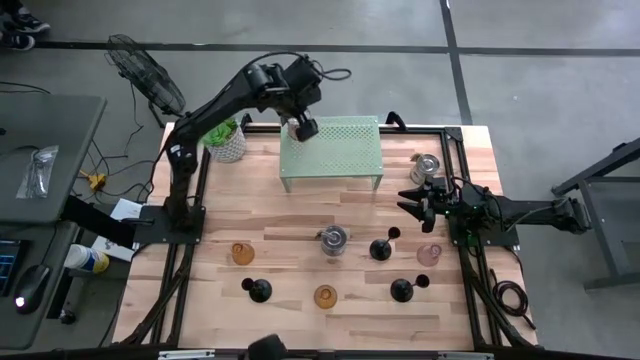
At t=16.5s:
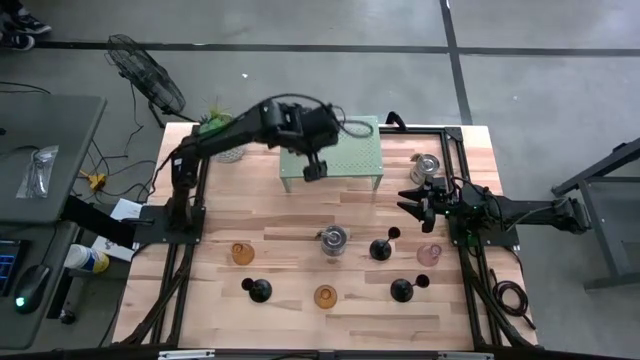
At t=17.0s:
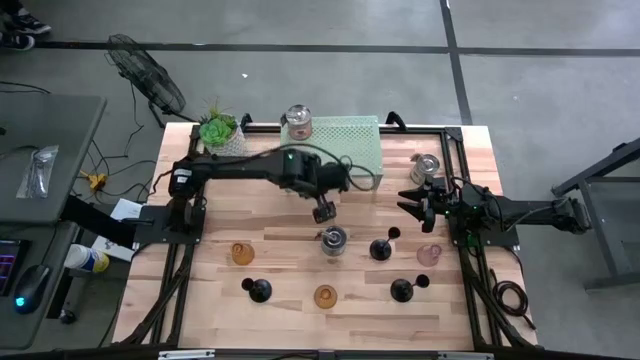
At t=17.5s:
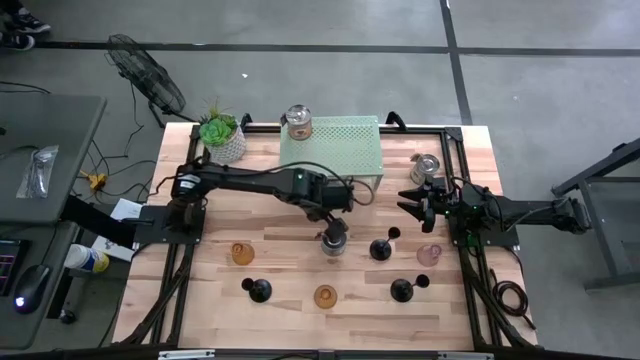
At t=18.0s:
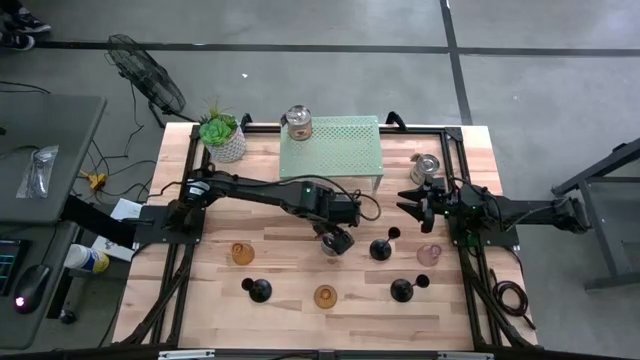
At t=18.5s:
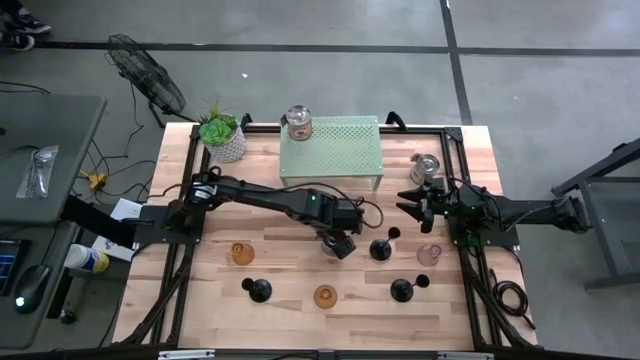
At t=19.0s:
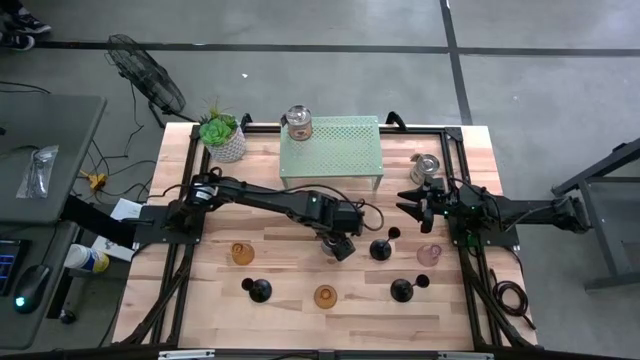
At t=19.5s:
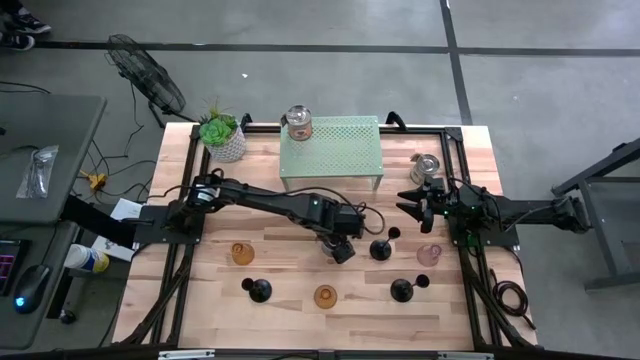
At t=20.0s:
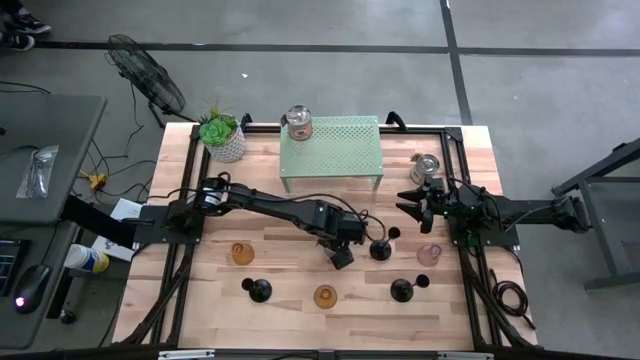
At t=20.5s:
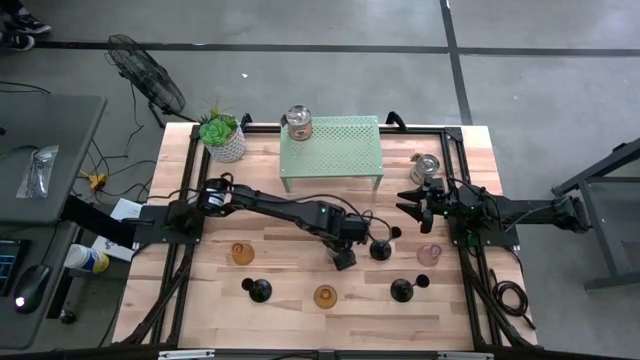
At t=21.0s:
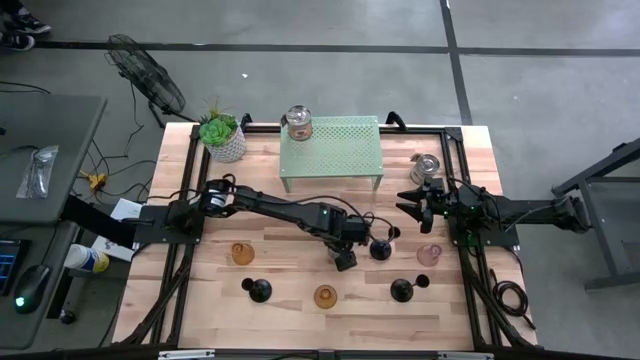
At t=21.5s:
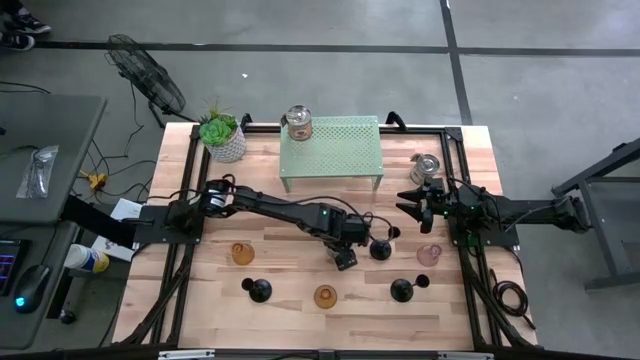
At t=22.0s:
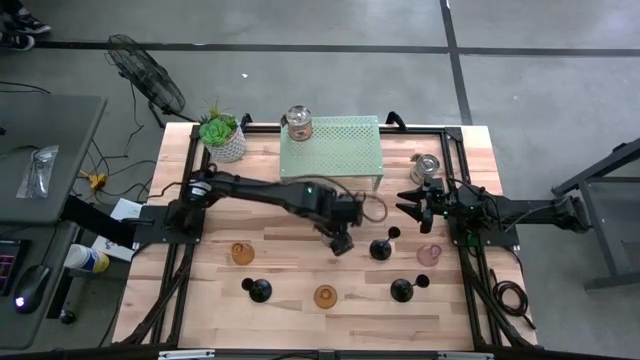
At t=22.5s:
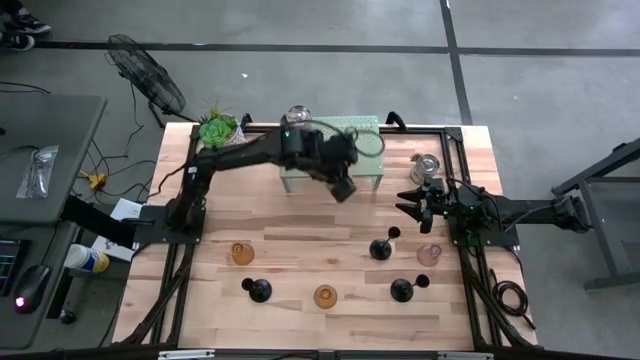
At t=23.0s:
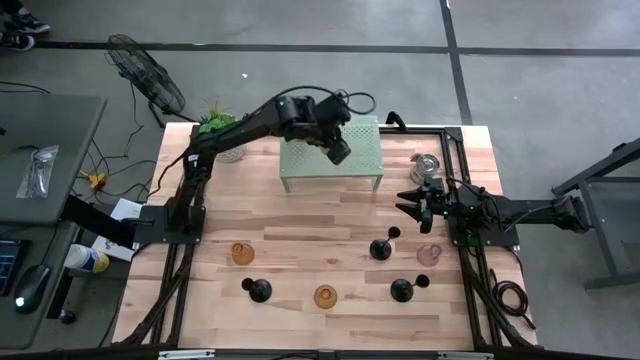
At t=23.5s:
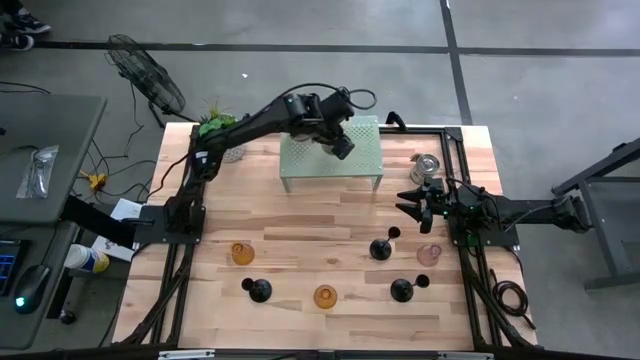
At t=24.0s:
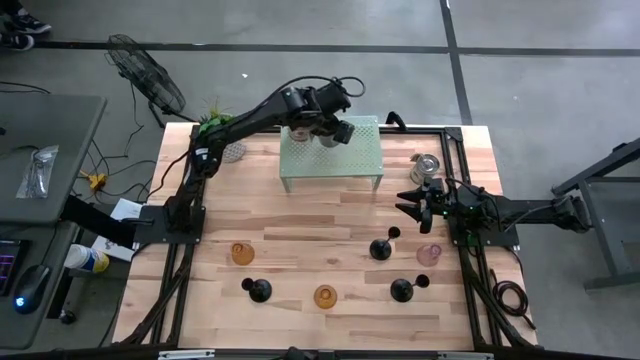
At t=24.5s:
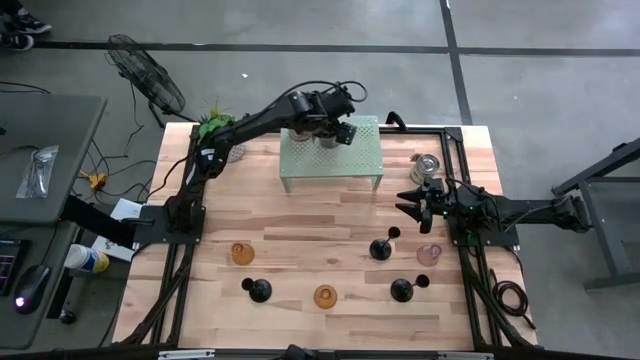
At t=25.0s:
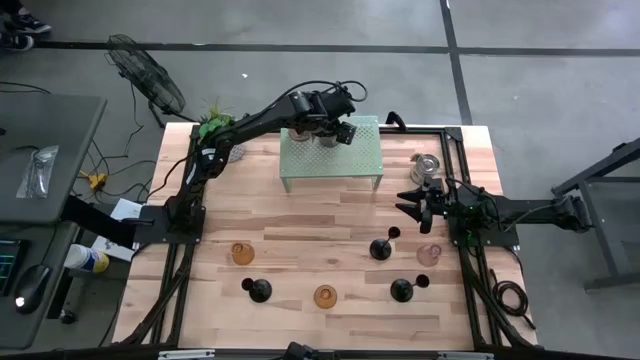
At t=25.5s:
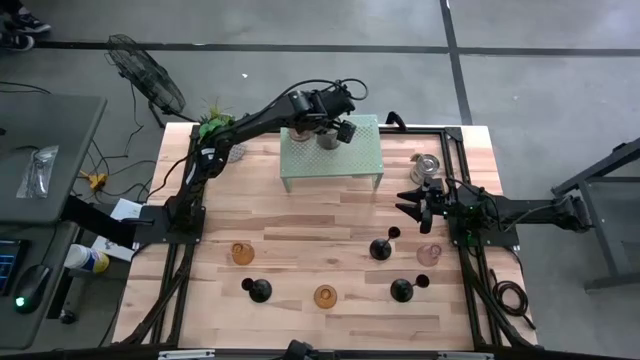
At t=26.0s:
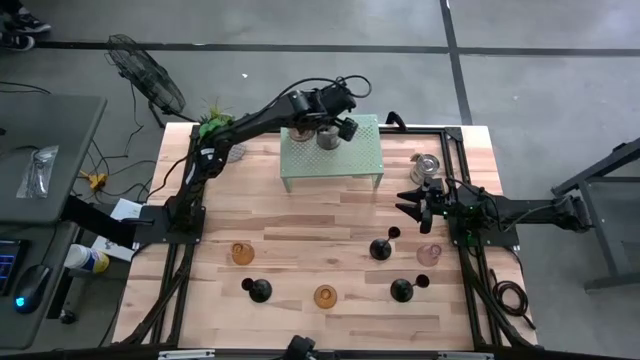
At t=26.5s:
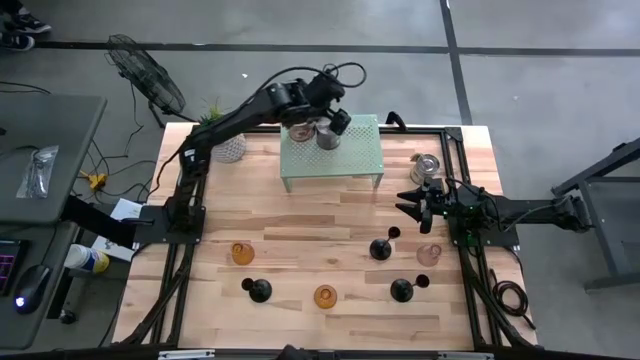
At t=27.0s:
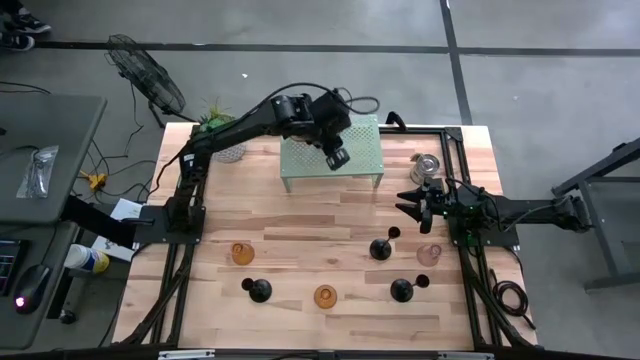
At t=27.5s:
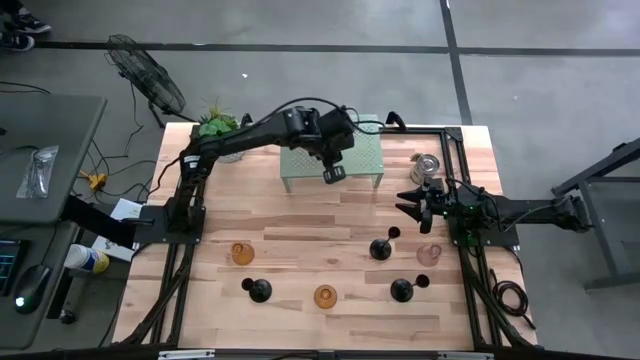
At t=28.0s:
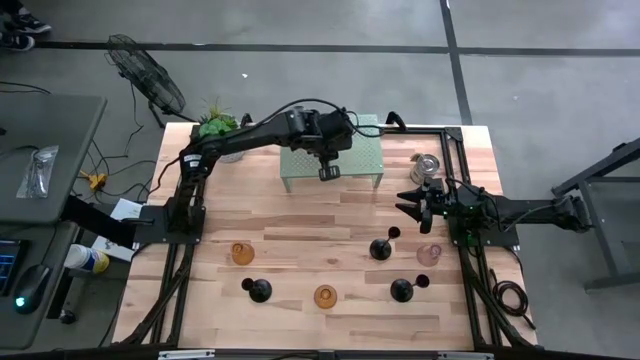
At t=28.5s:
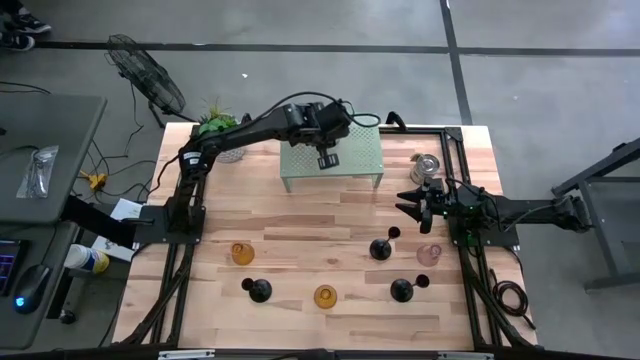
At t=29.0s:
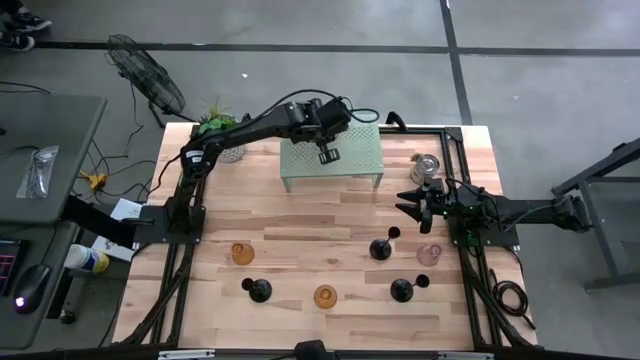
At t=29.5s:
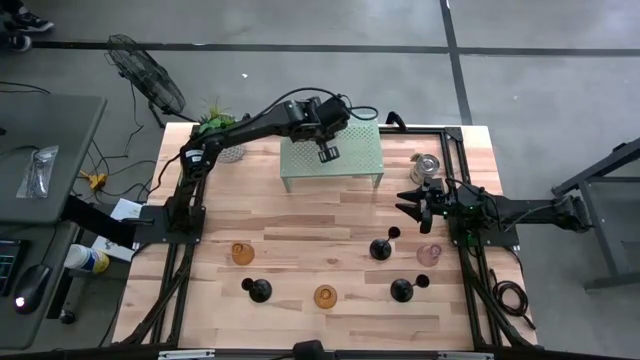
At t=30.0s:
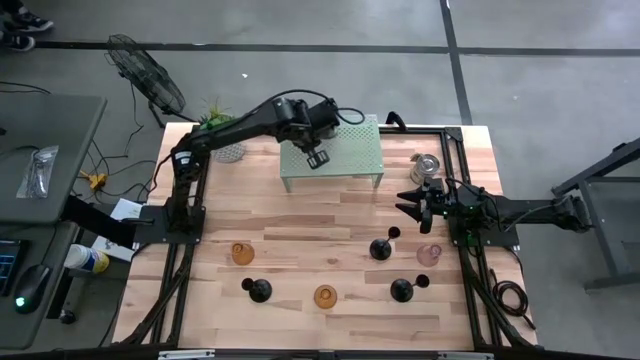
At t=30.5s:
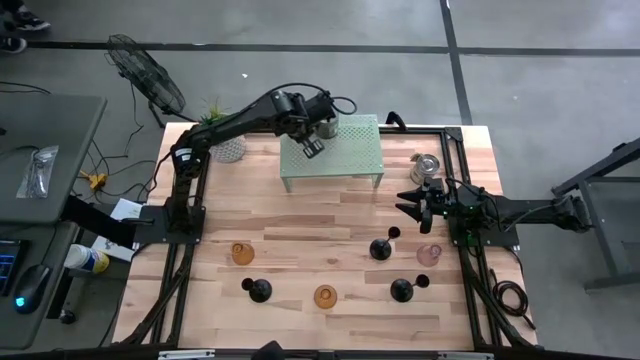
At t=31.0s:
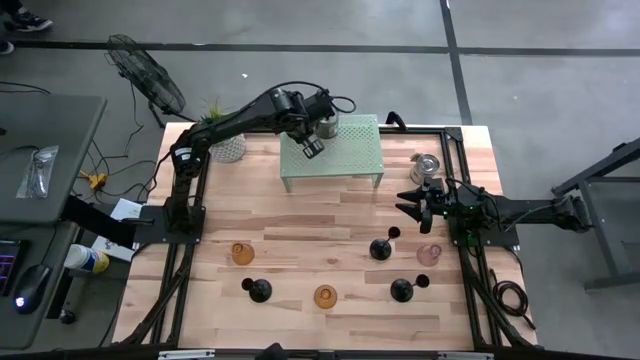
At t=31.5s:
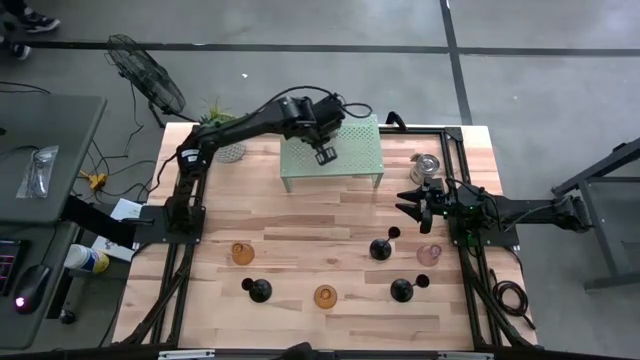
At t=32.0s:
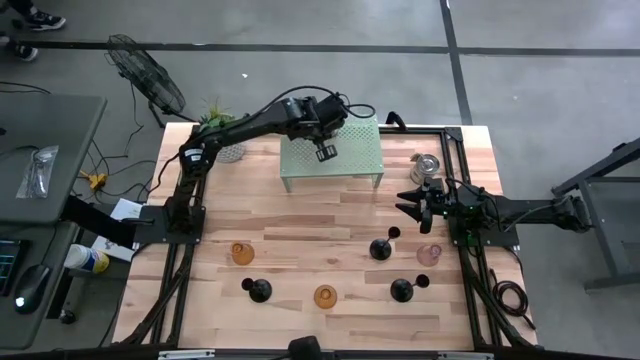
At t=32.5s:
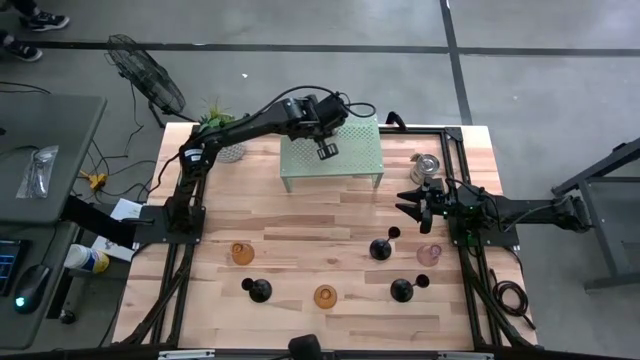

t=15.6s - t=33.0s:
Task: Pick & Place candle stick holders
Put the bottom silver scented candle on the shelf
